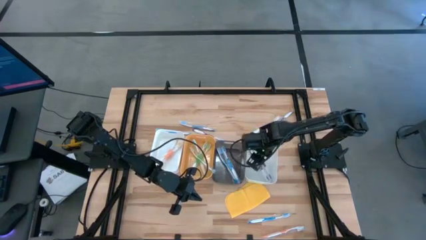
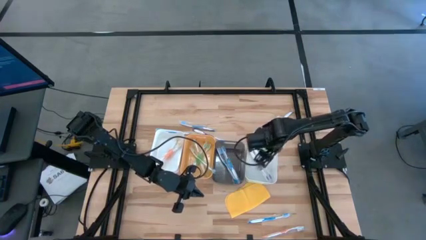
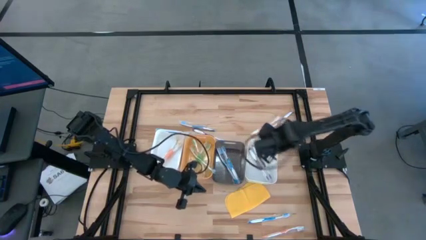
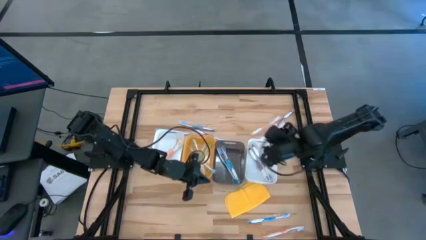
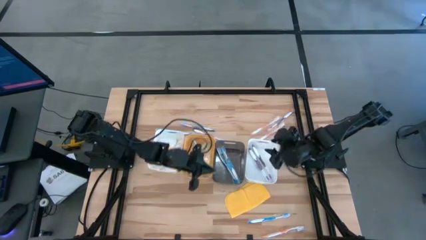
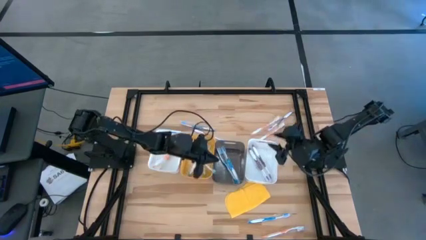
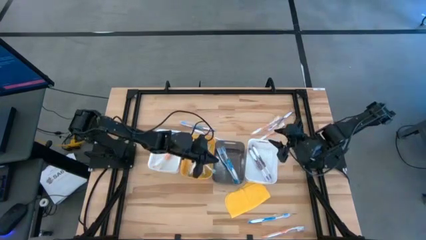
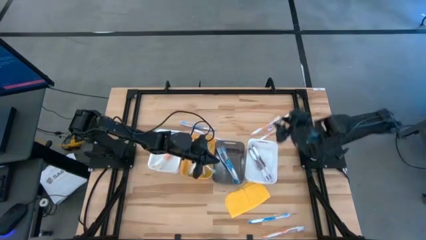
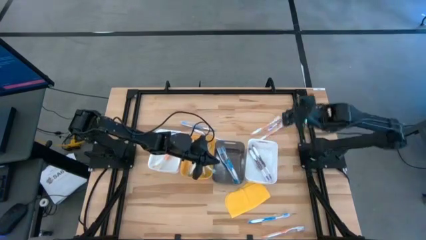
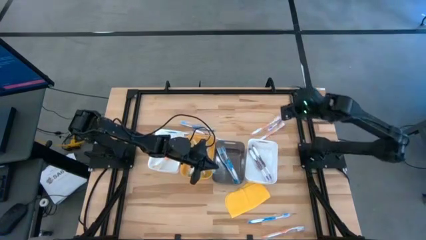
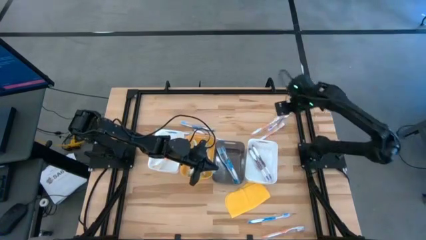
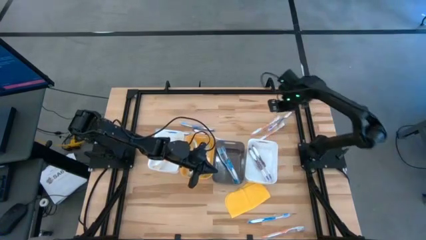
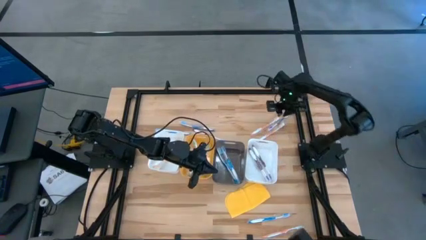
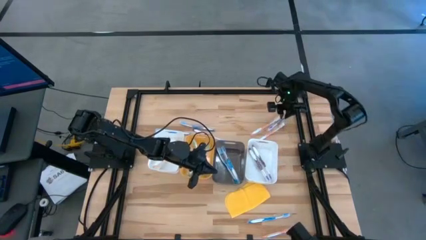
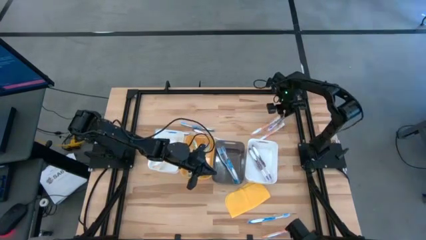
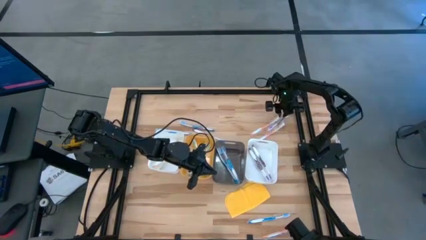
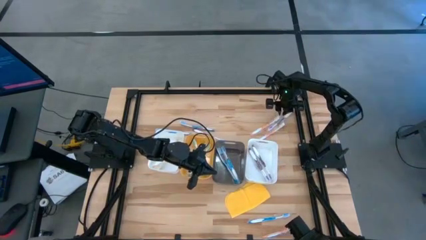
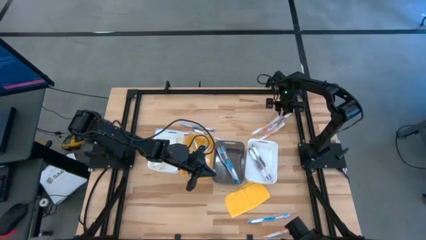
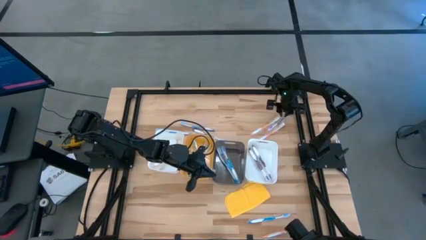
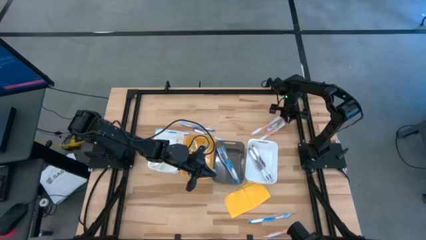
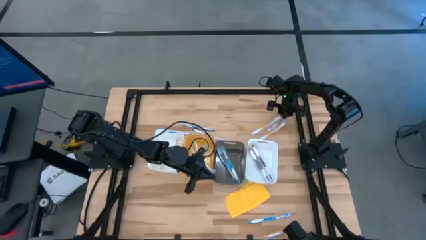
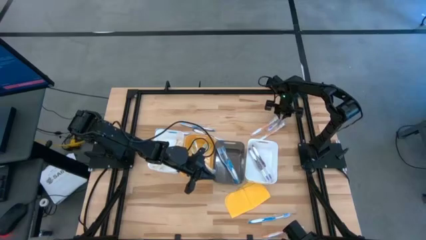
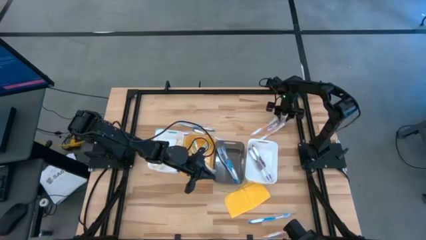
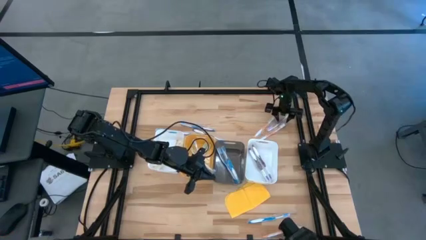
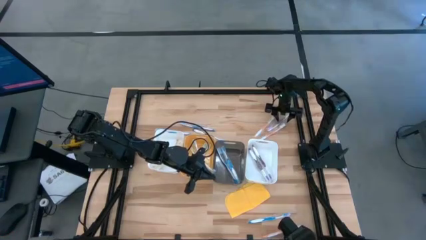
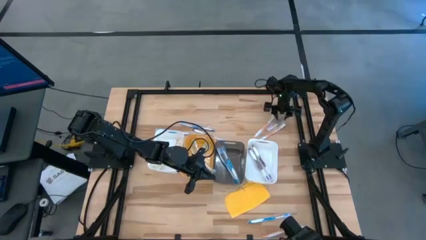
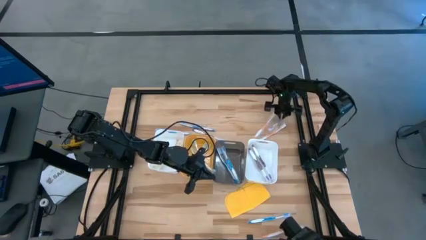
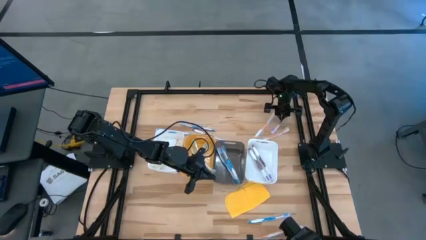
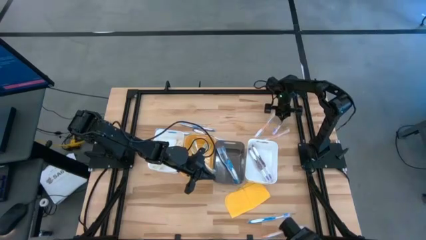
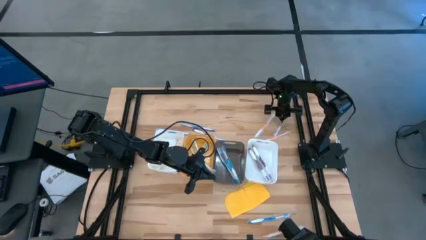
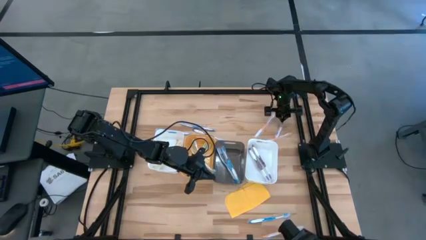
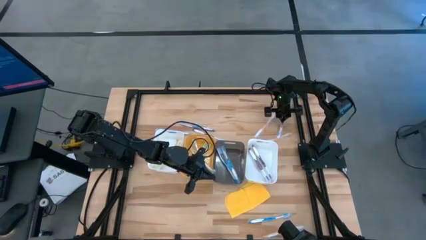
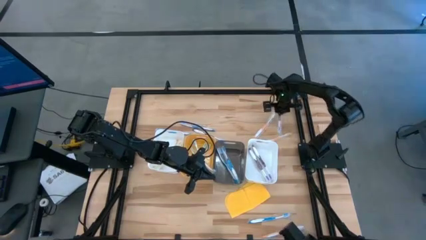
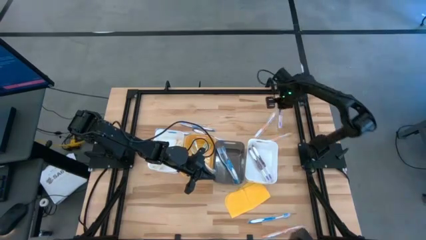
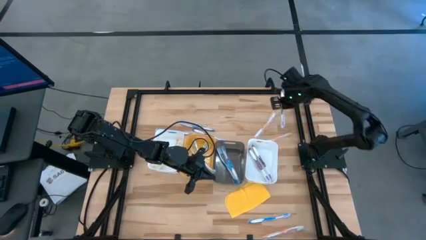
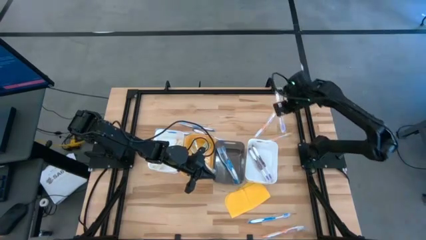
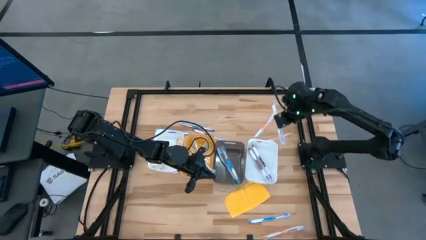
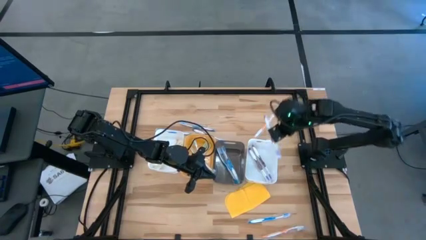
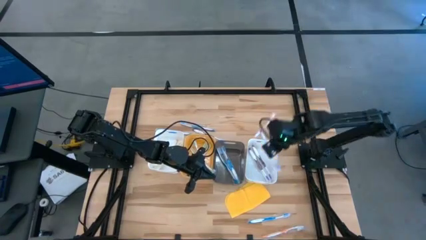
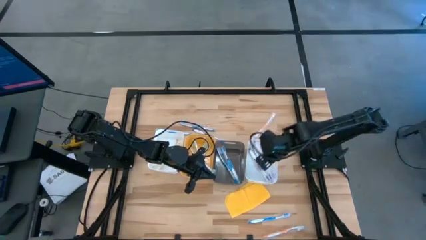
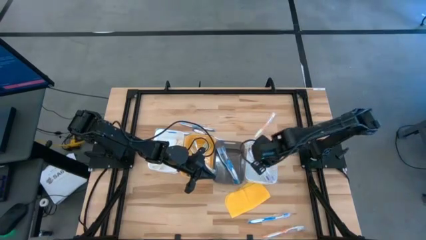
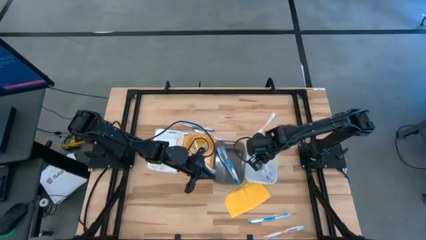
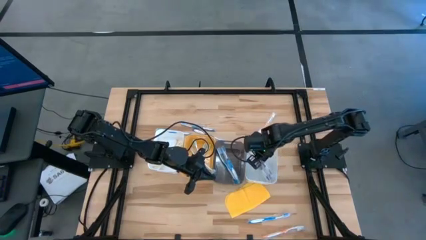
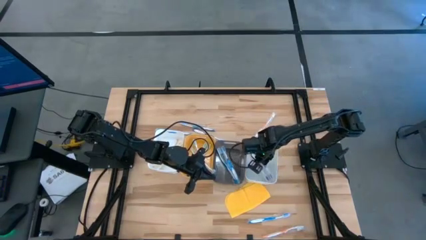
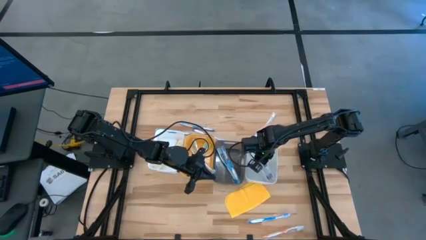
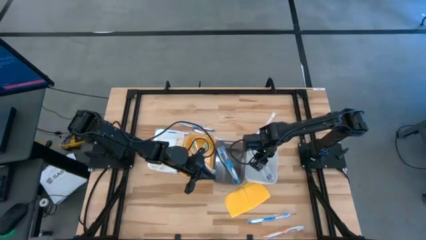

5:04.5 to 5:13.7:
Task: Pick & Place Toothbrushes
Put the purple toothbrush into the right white bin

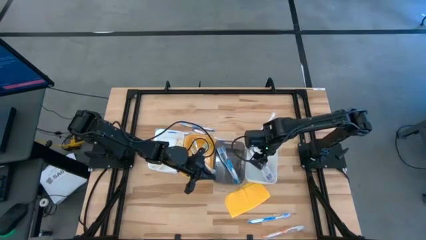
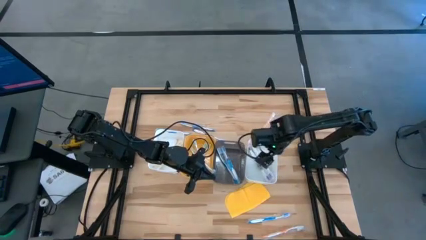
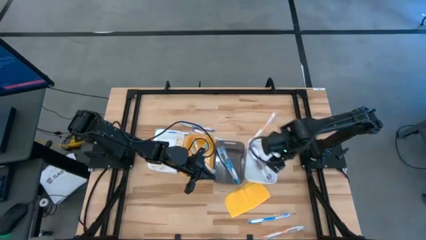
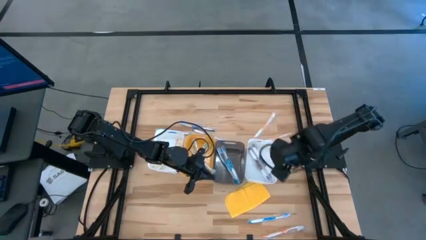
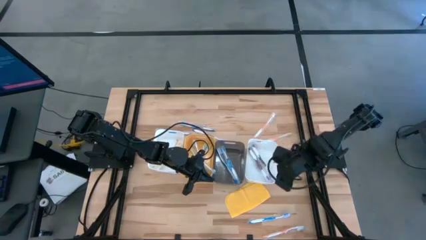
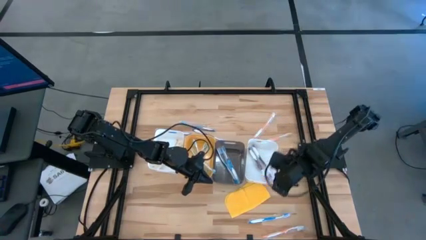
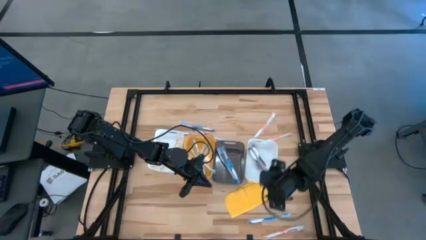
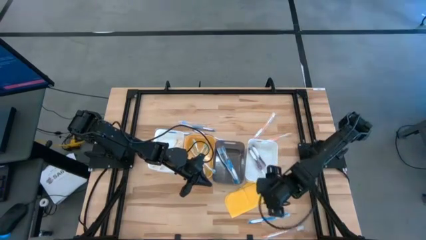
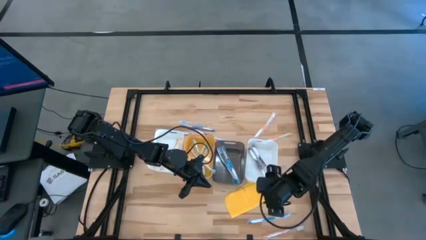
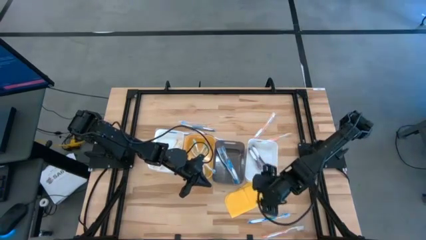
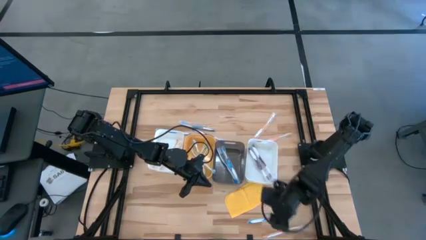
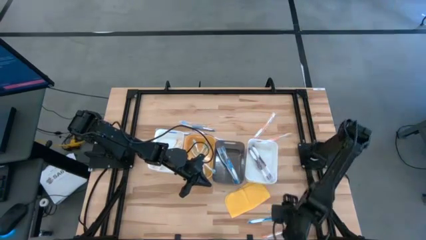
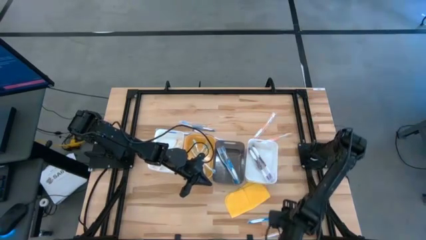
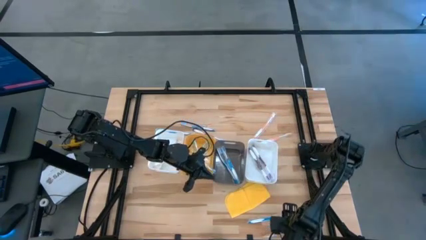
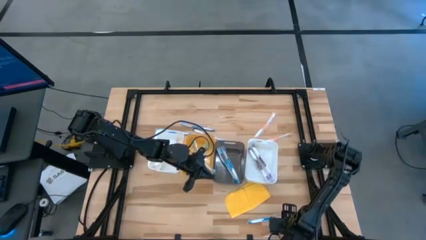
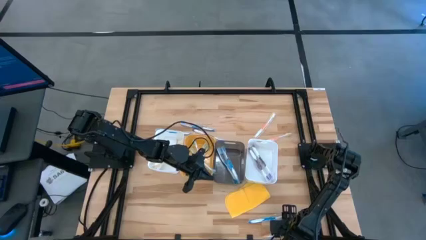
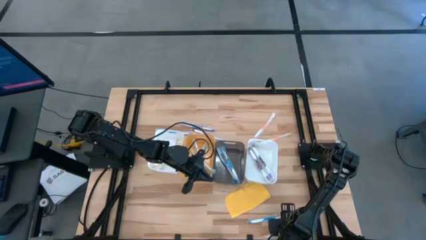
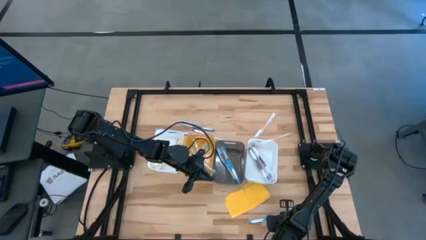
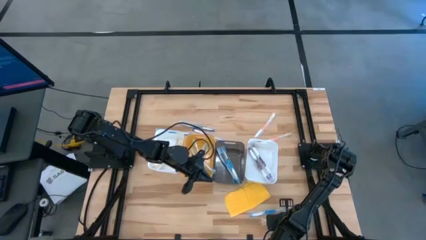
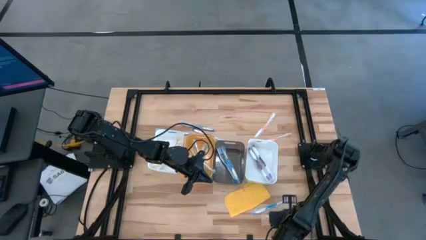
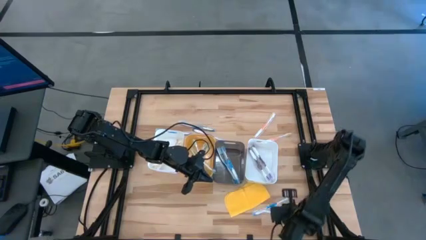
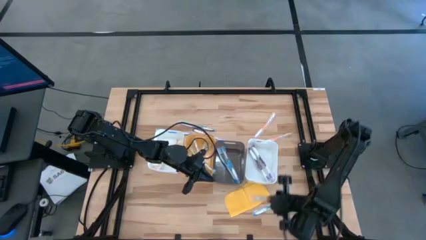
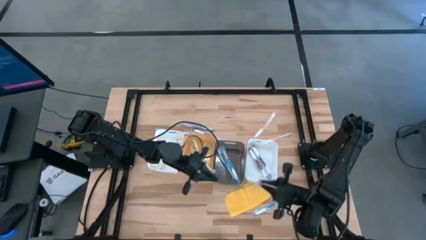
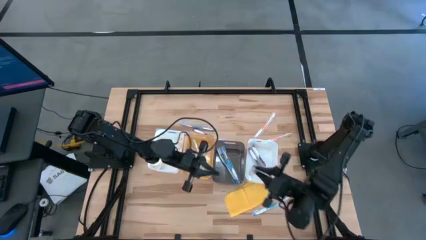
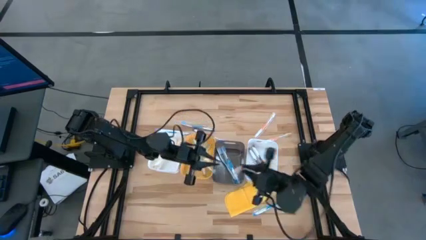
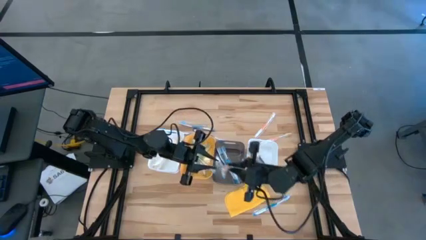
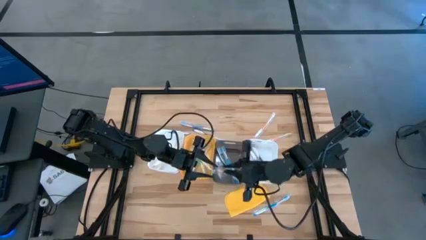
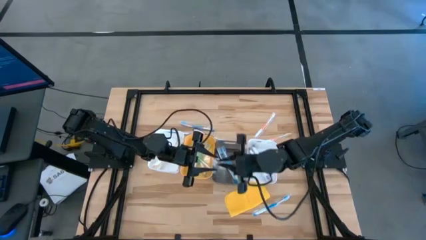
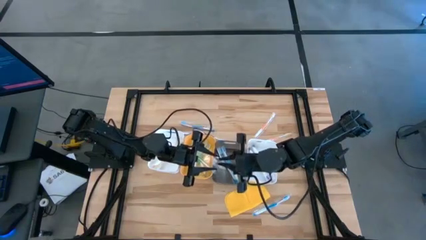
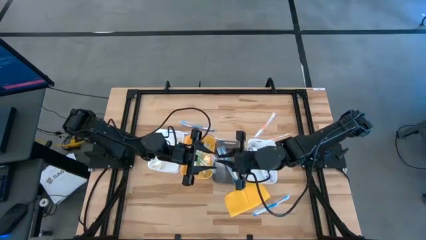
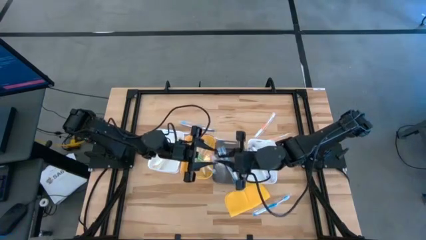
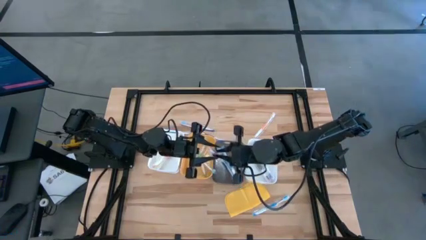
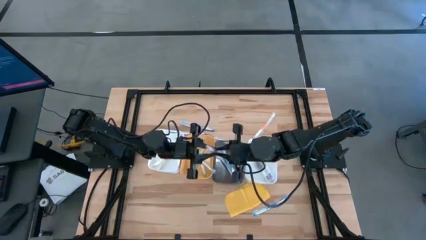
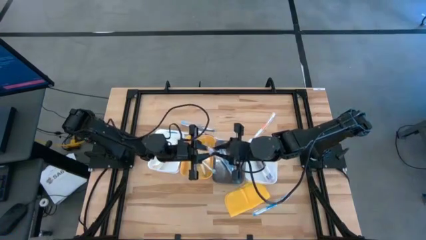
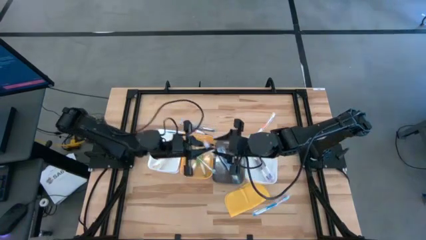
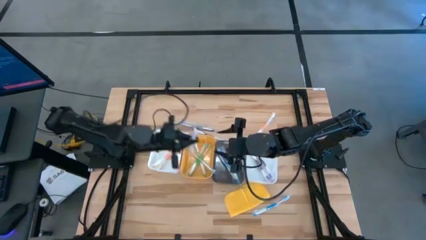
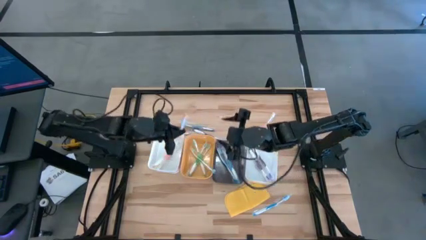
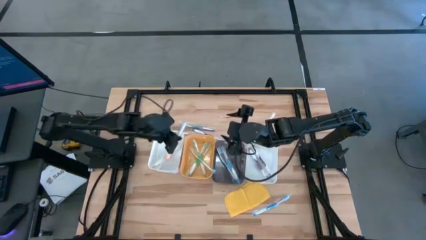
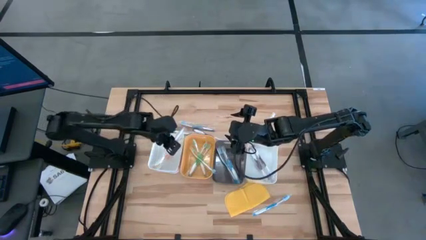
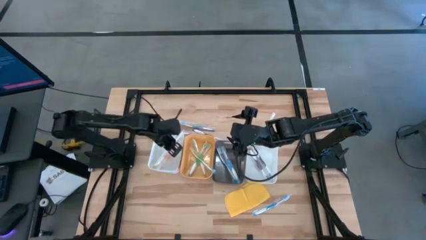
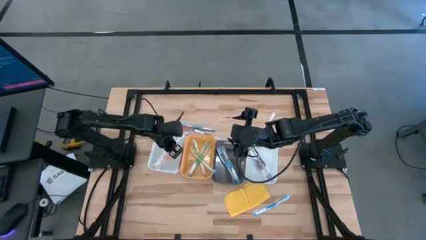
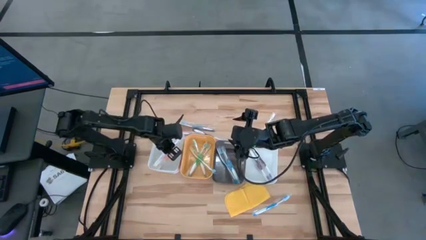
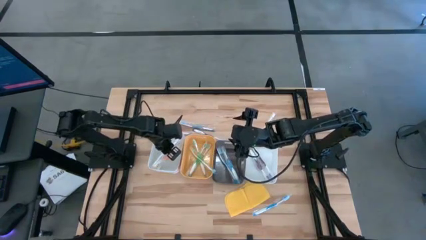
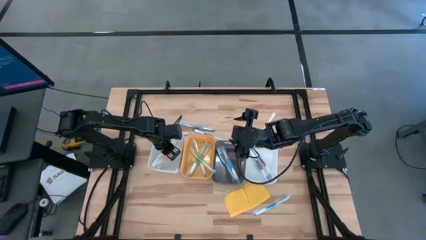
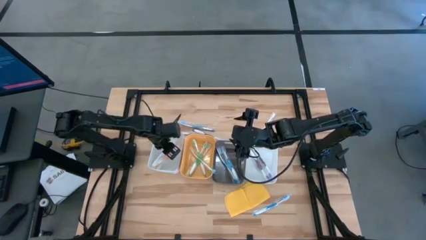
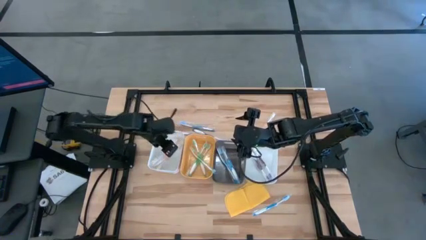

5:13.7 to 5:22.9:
Put the orange toothbrush into the left white bin
